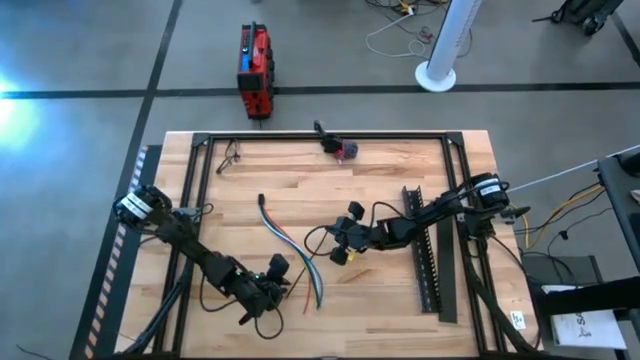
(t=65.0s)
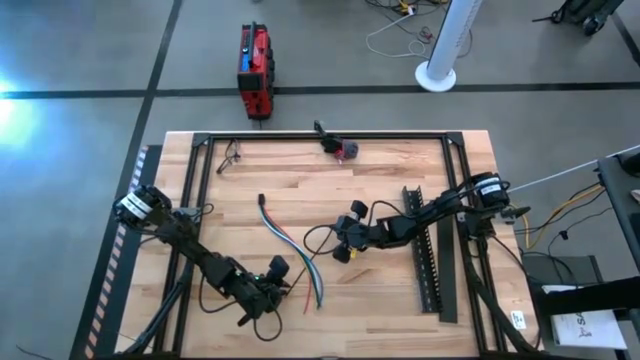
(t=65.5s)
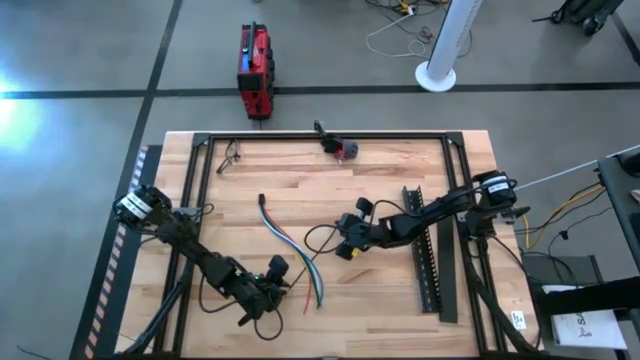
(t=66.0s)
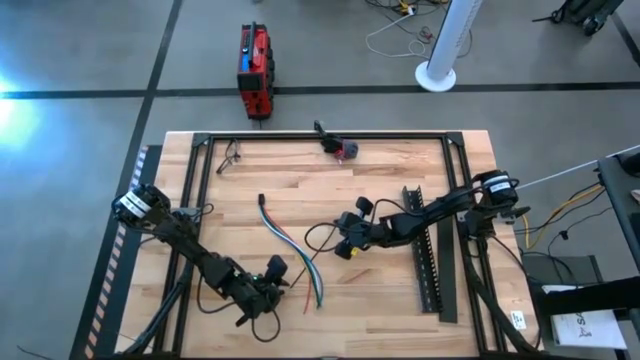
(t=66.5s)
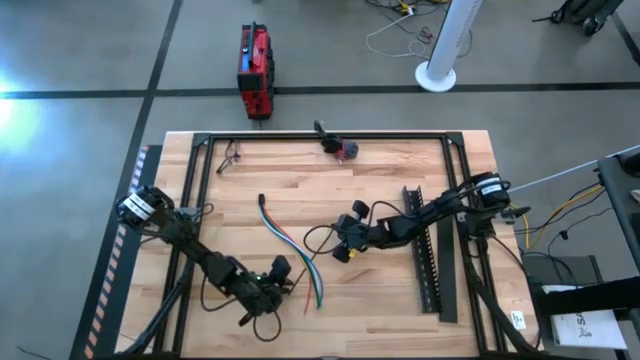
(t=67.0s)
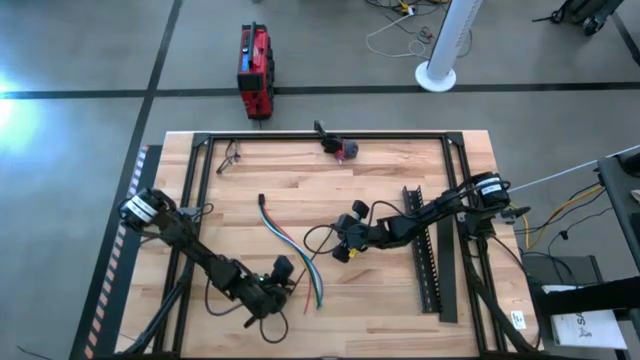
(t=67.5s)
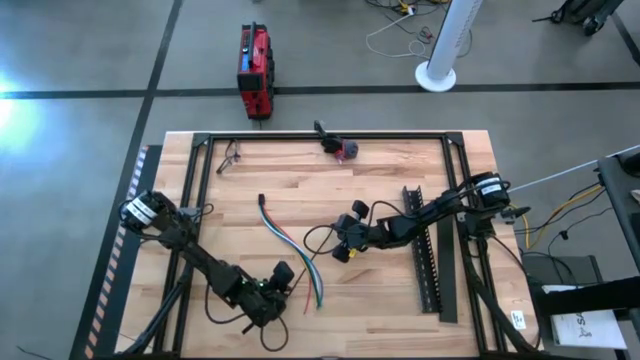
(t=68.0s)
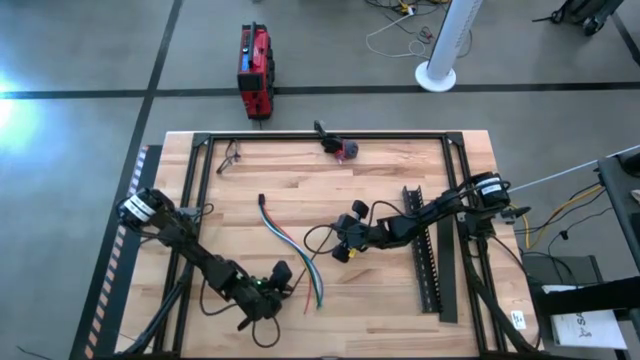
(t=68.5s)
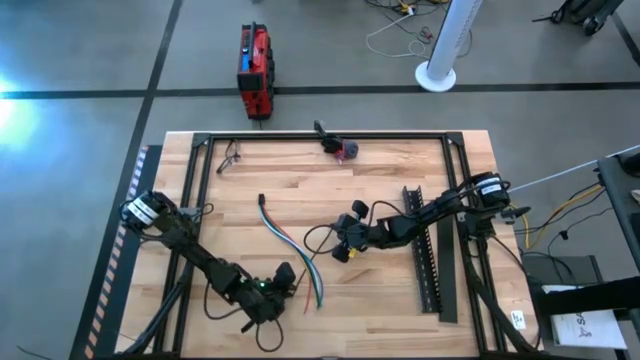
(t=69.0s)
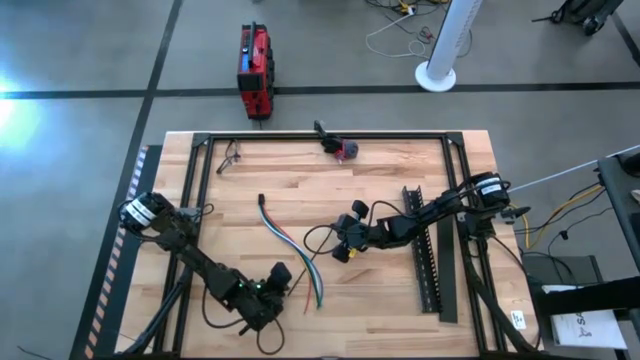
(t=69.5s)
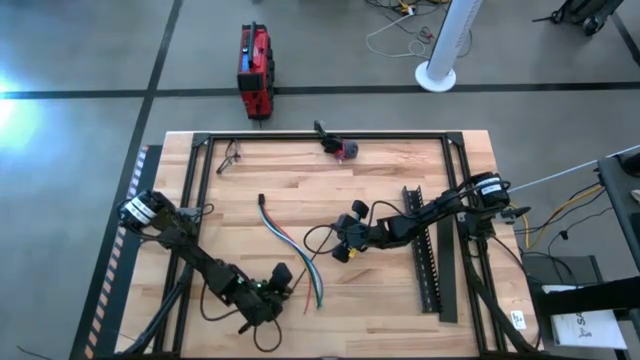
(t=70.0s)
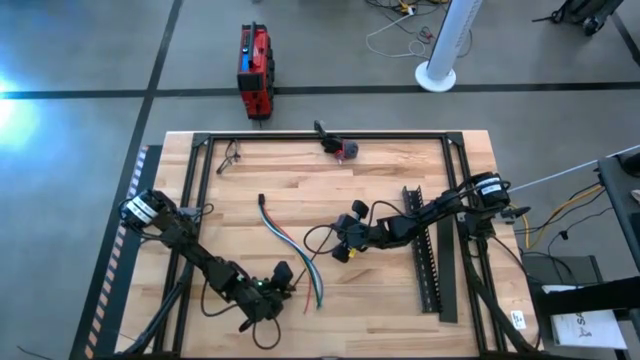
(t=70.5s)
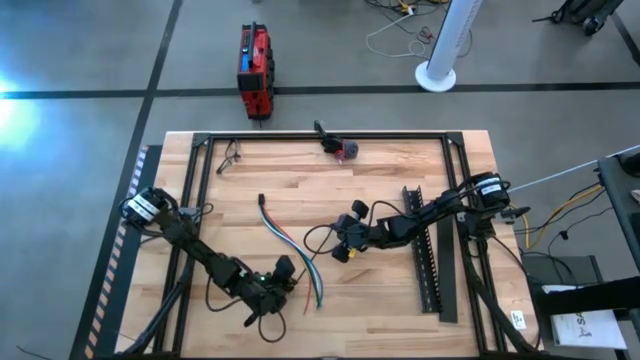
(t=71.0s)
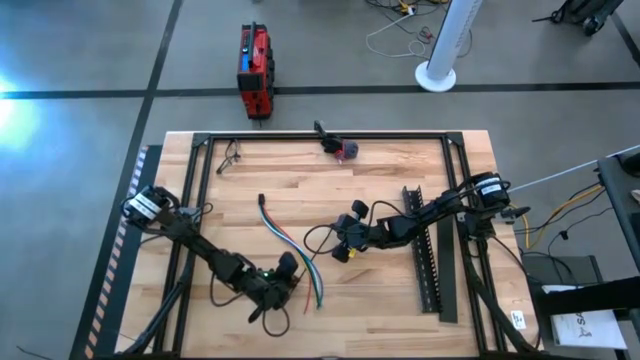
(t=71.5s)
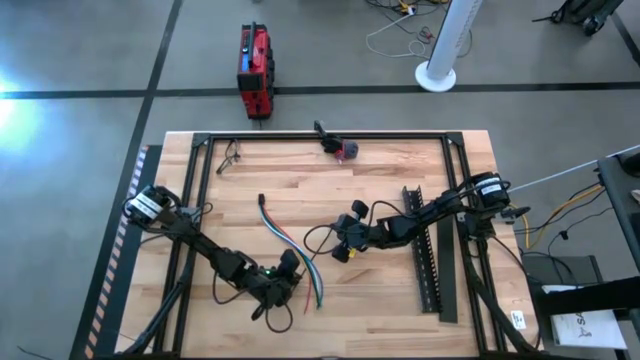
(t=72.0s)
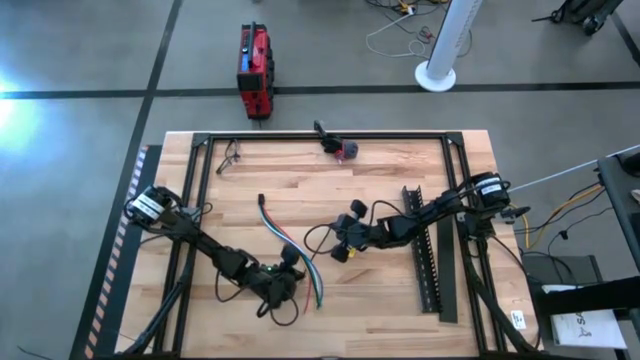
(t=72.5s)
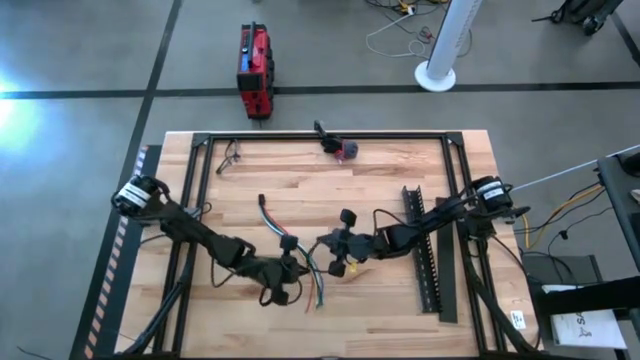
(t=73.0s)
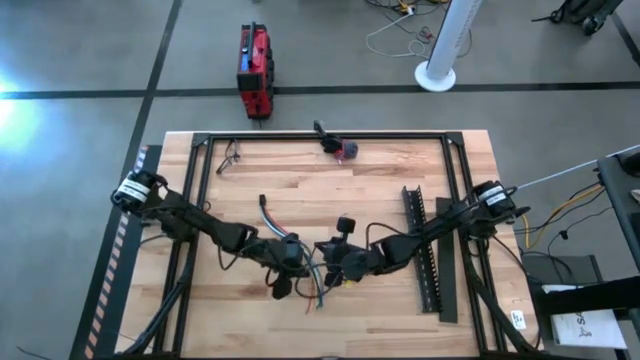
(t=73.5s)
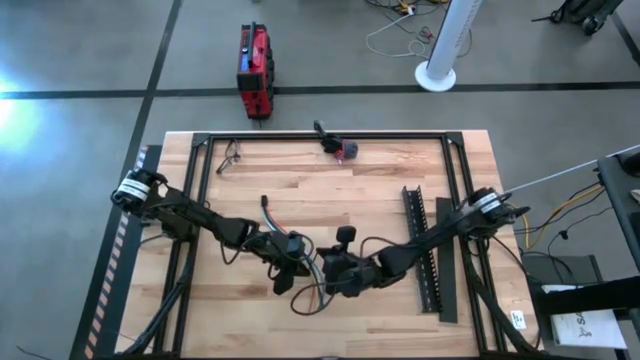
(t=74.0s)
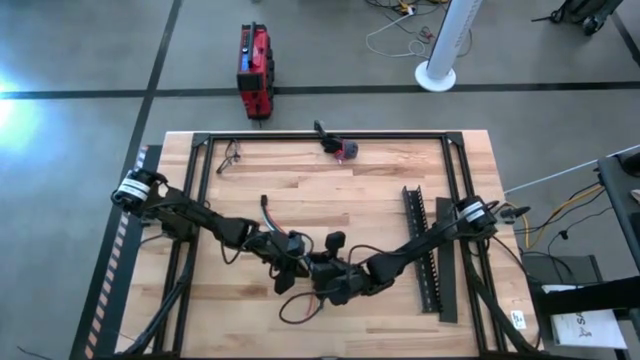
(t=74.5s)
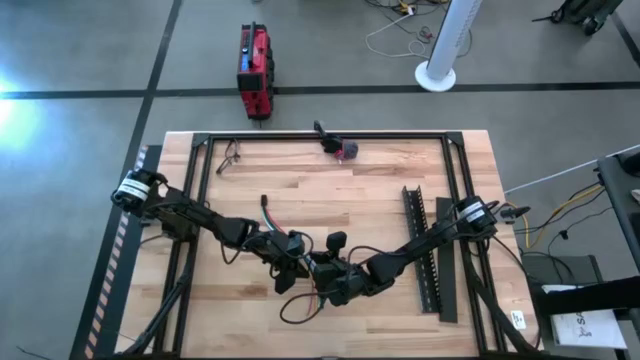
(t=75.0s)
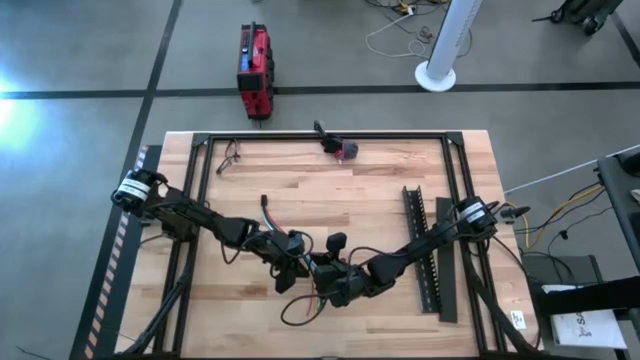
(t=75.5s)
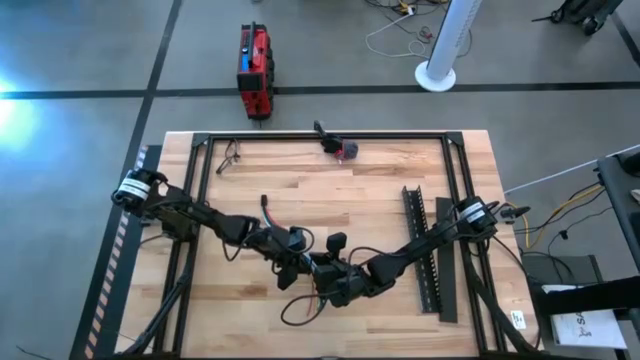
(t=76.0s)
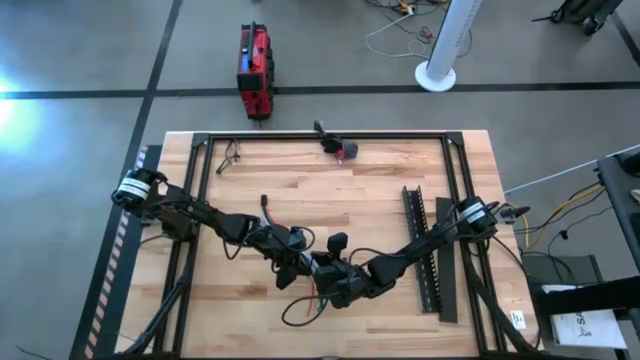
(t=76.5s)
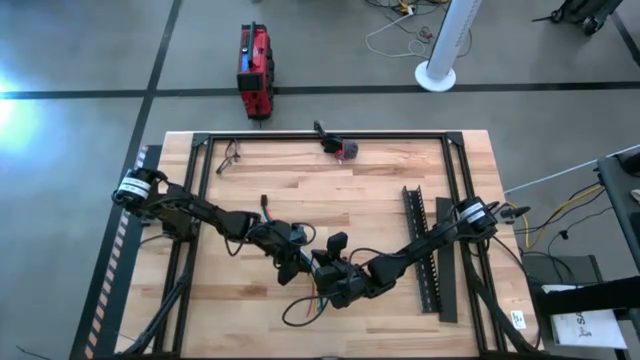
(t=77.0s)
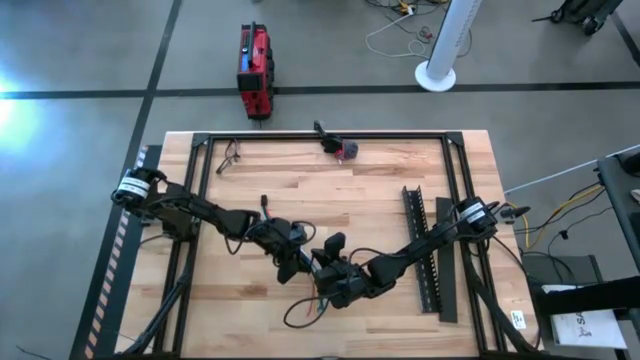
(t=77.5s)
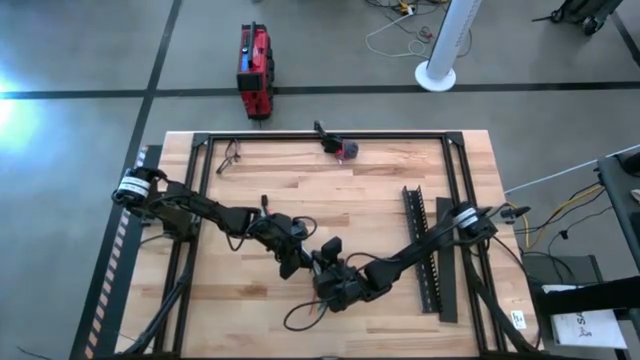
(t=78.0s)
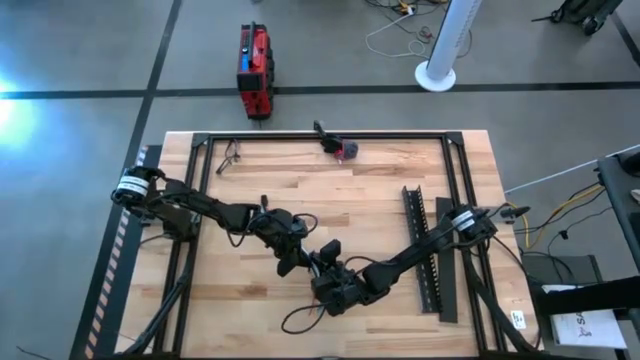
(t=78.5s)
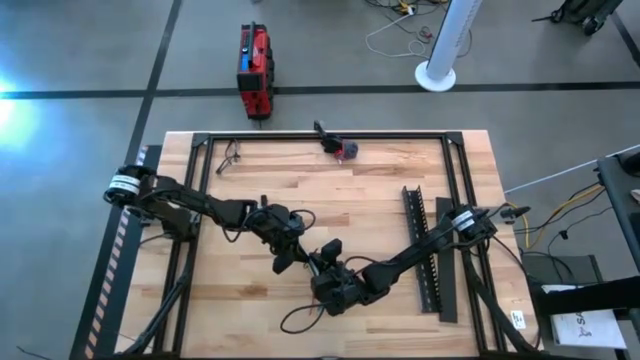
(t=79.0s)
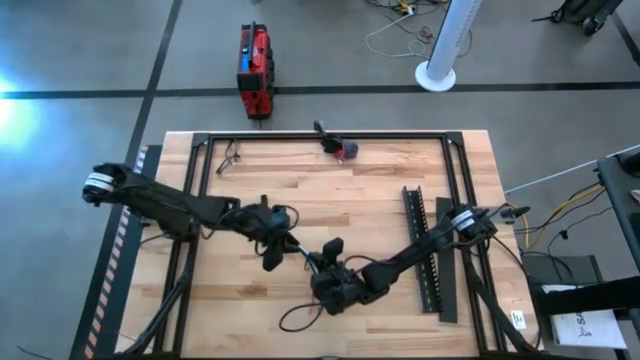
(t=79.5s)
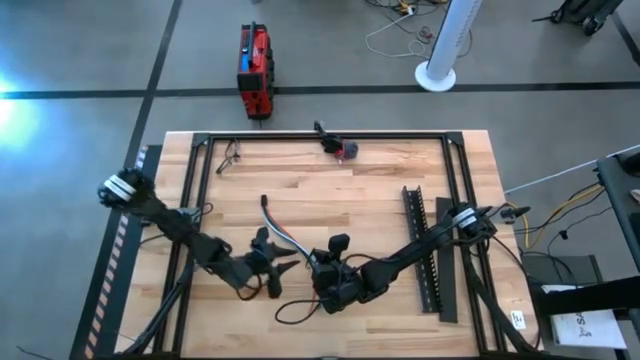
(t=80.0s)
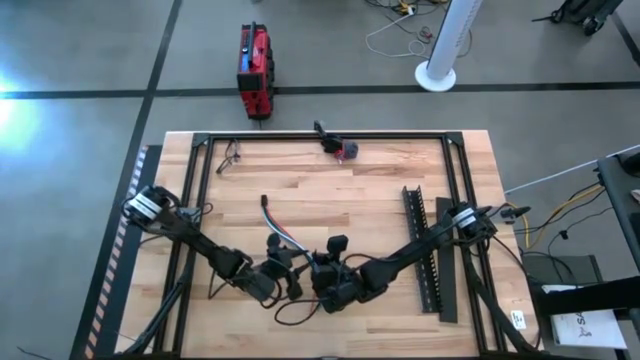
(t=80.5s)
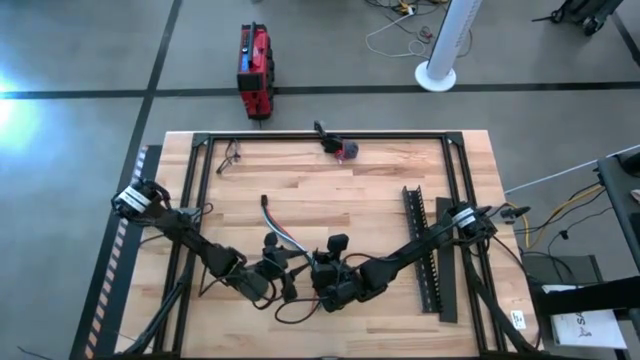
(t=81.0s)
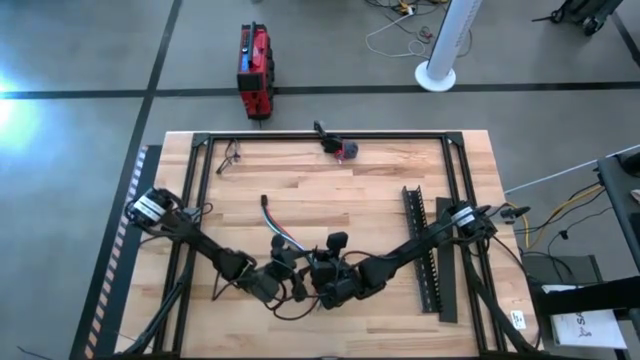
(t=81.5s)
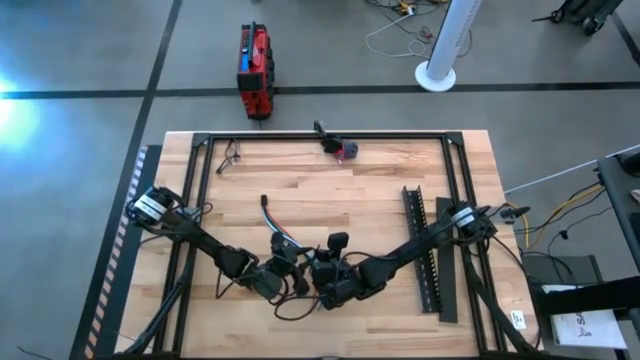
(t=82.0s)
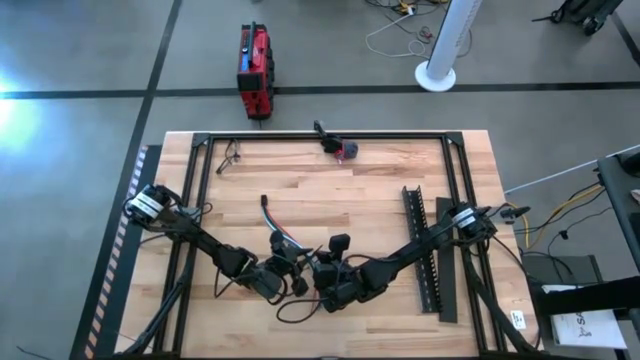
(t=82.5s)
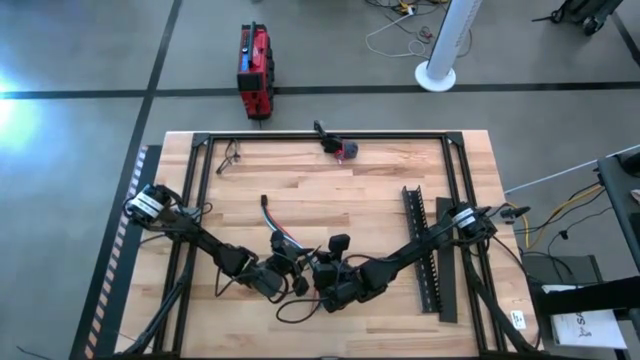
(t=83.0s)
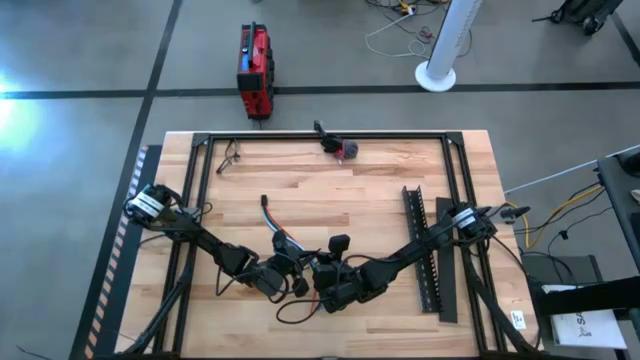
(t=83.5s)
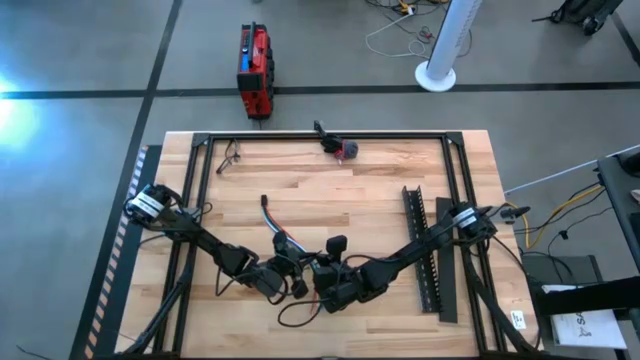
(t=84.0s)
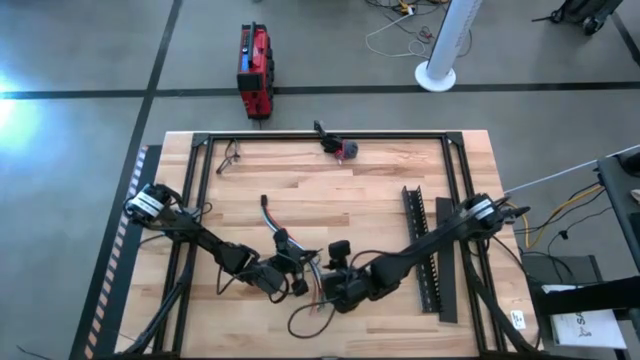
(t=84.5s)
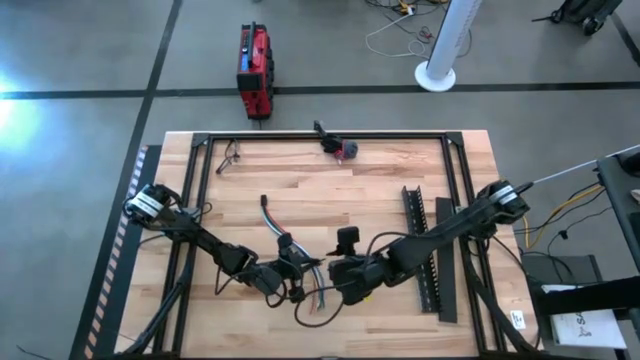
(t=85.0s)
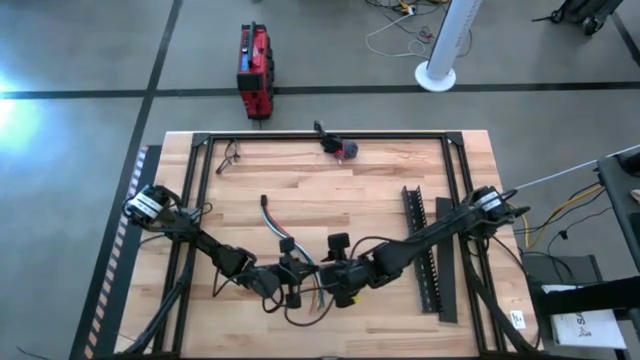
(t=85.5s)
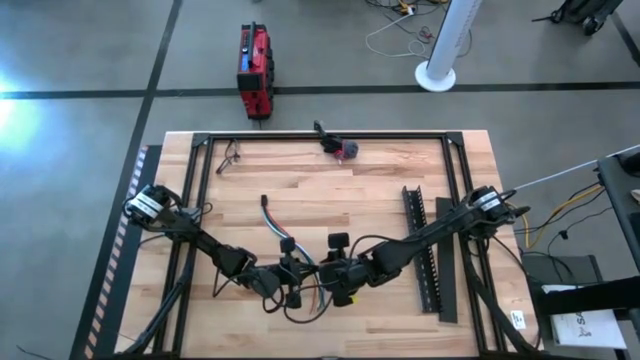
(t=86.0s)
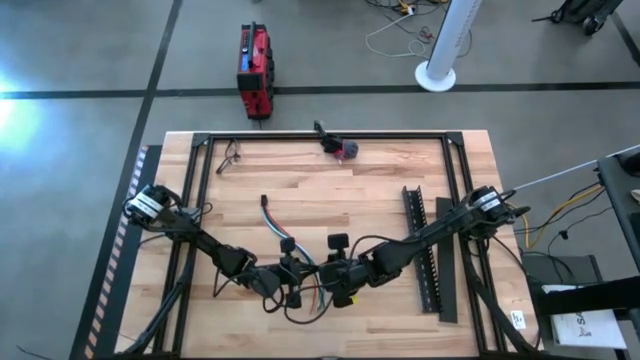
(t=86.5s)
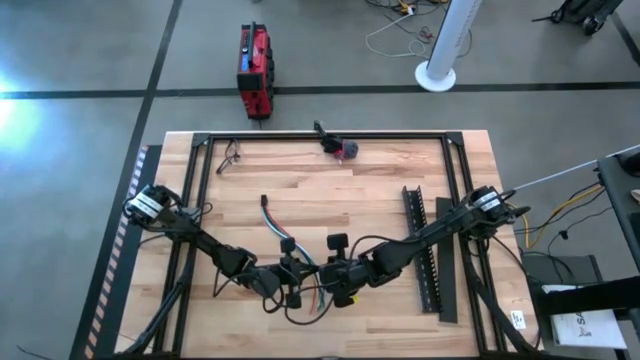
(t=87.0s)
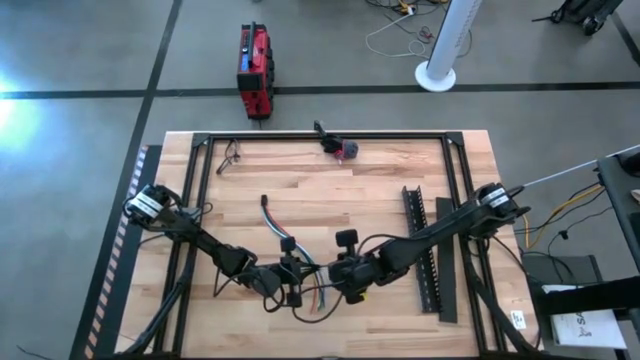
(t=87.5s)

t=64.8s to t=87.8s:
Task: Ziptie cables
Close the cables together using a zip tie
